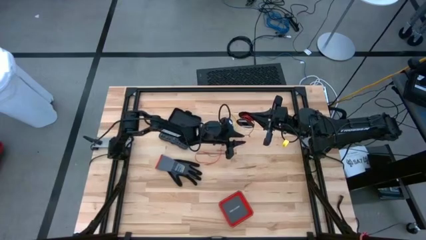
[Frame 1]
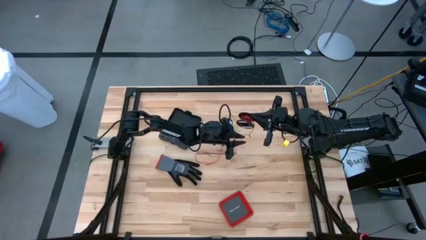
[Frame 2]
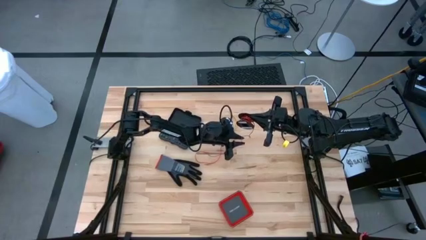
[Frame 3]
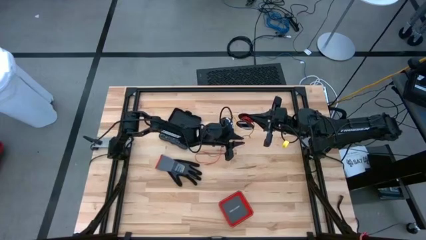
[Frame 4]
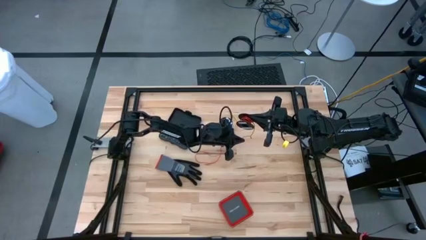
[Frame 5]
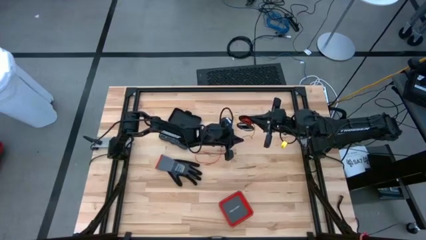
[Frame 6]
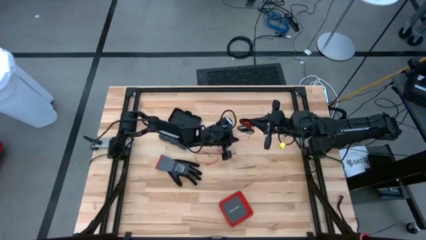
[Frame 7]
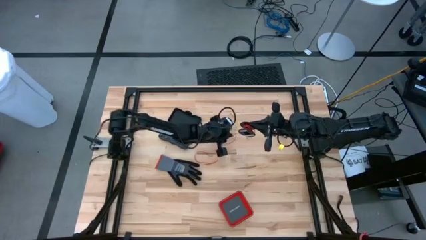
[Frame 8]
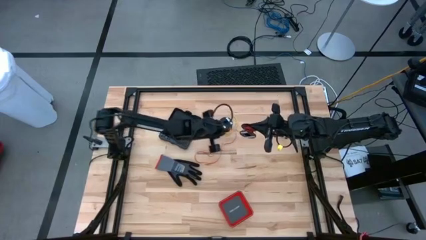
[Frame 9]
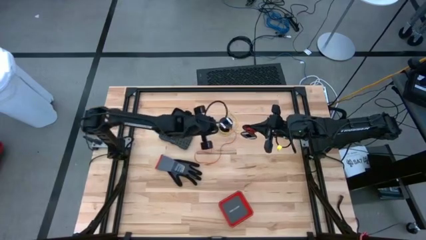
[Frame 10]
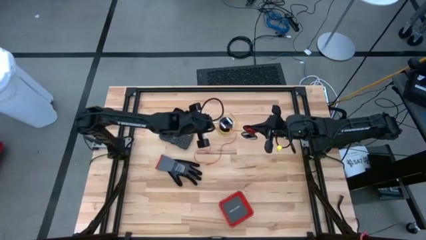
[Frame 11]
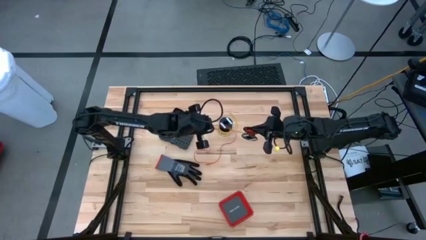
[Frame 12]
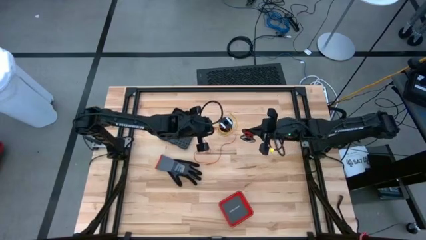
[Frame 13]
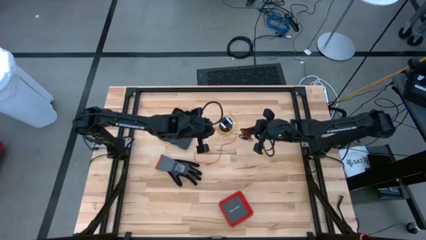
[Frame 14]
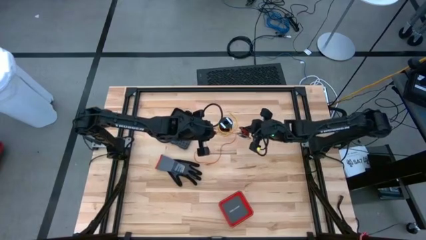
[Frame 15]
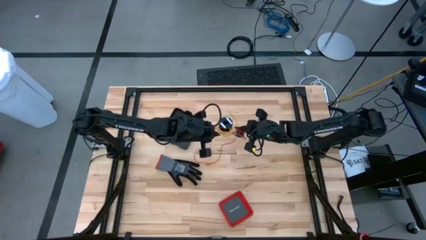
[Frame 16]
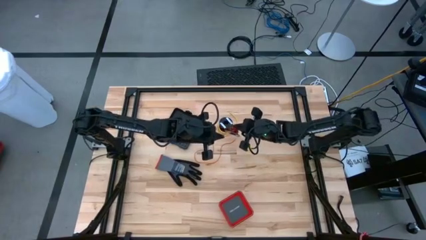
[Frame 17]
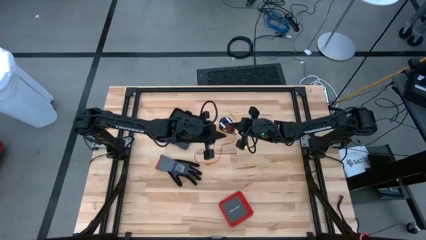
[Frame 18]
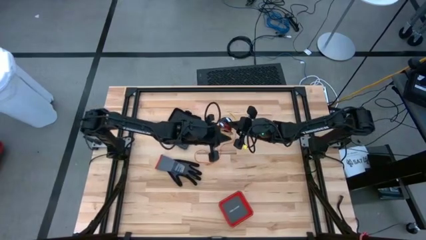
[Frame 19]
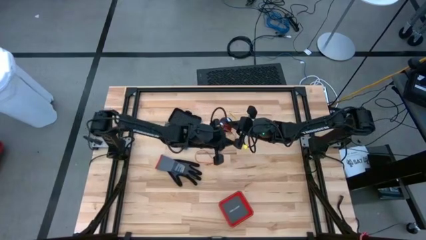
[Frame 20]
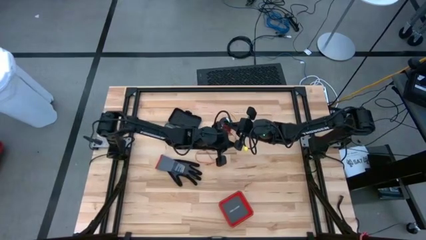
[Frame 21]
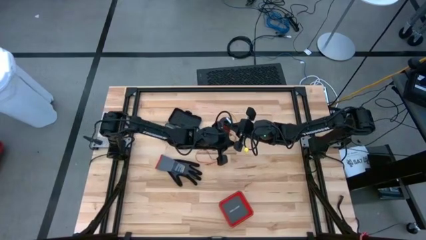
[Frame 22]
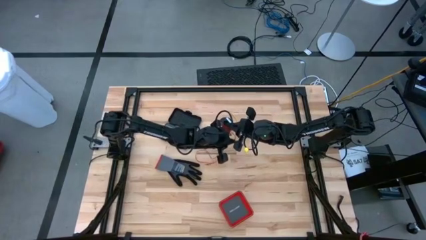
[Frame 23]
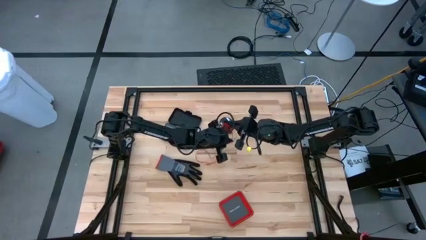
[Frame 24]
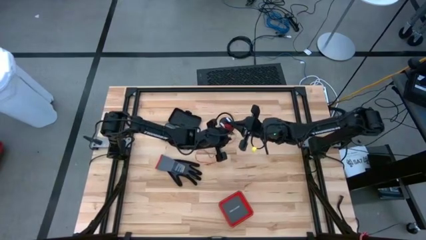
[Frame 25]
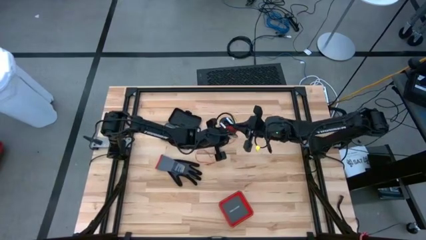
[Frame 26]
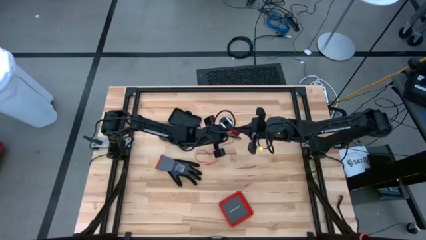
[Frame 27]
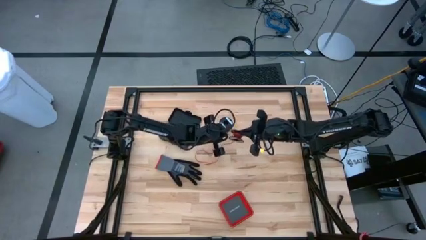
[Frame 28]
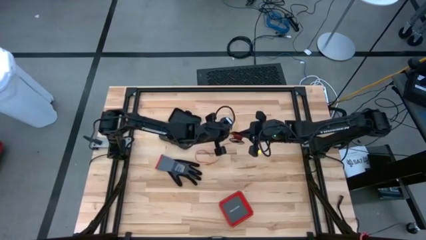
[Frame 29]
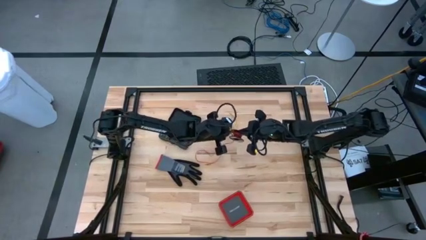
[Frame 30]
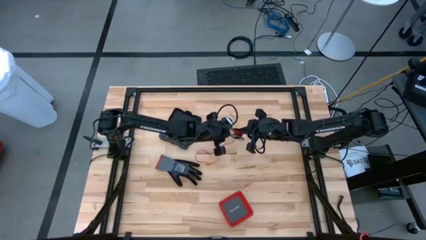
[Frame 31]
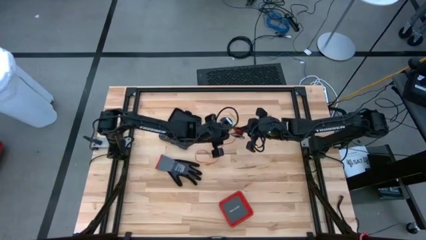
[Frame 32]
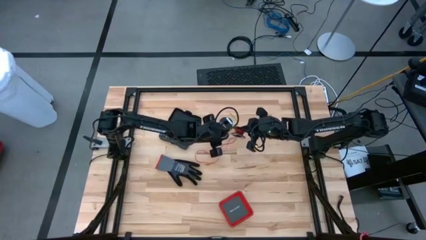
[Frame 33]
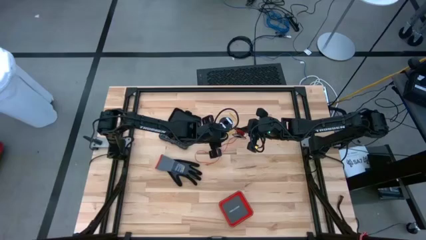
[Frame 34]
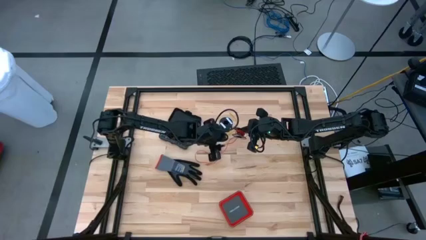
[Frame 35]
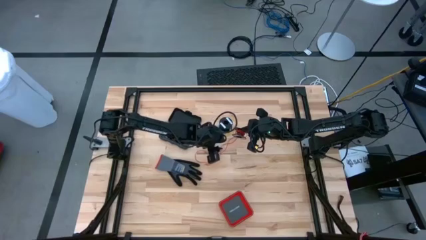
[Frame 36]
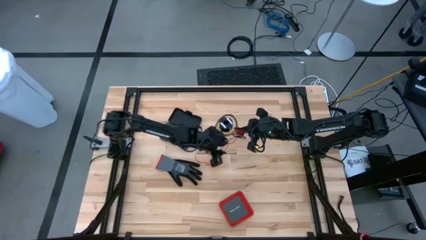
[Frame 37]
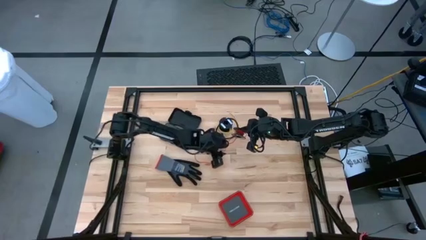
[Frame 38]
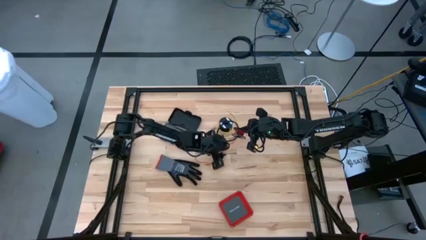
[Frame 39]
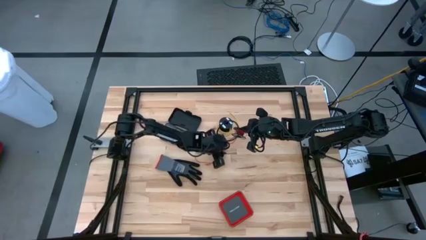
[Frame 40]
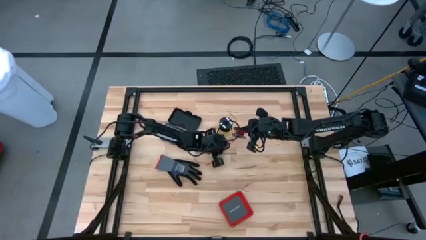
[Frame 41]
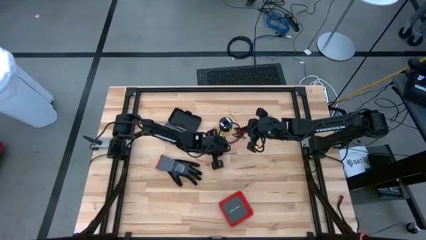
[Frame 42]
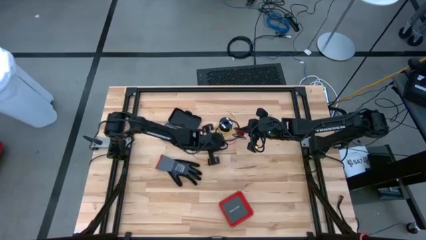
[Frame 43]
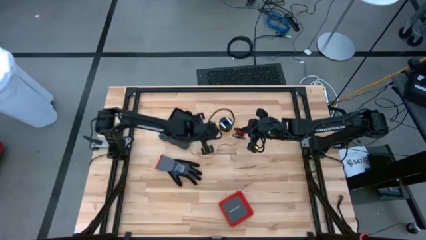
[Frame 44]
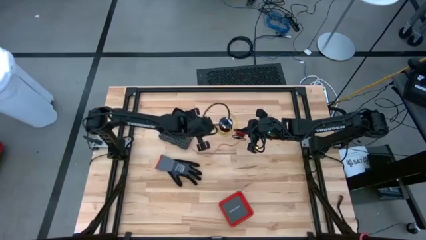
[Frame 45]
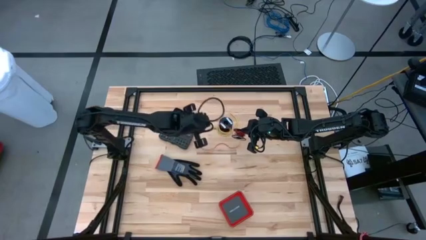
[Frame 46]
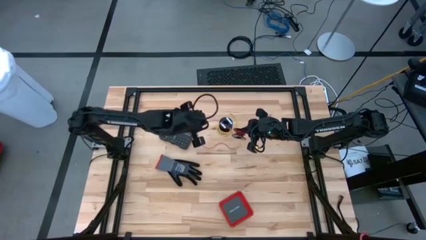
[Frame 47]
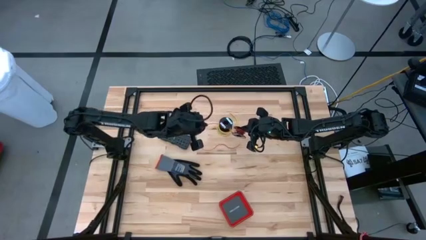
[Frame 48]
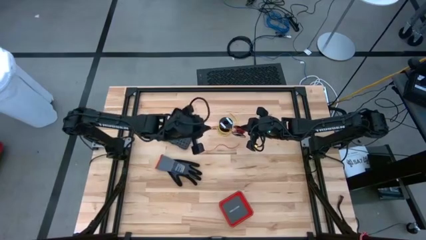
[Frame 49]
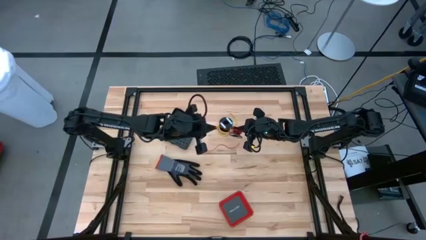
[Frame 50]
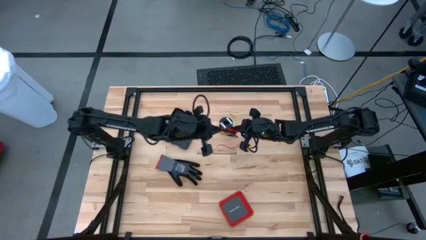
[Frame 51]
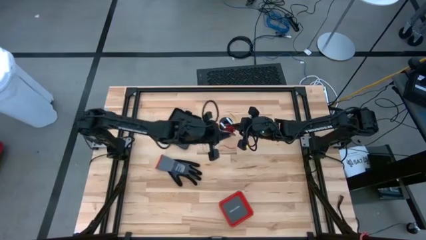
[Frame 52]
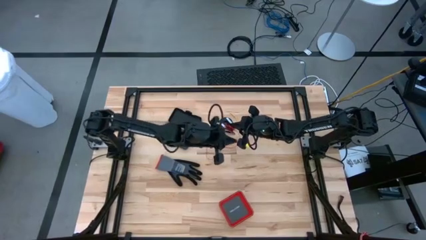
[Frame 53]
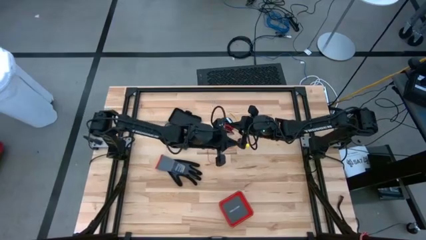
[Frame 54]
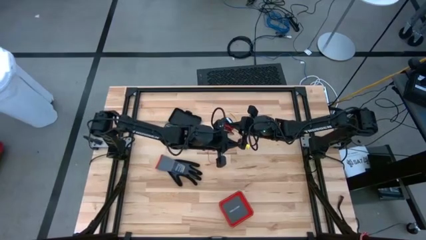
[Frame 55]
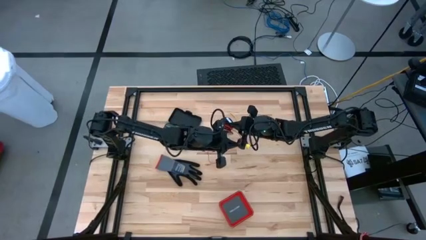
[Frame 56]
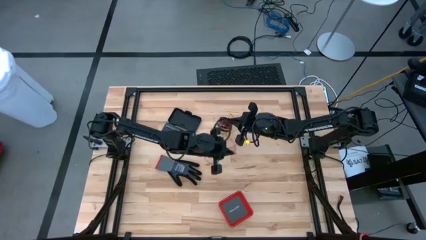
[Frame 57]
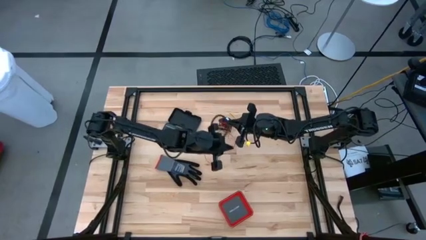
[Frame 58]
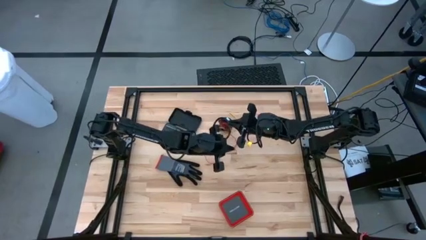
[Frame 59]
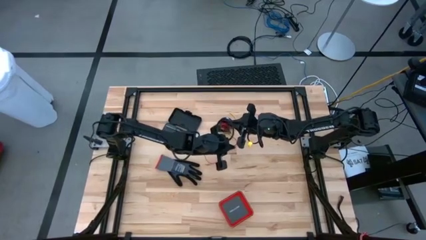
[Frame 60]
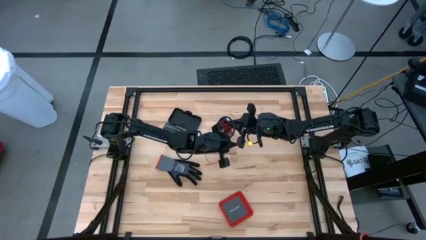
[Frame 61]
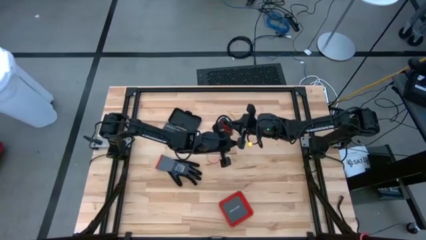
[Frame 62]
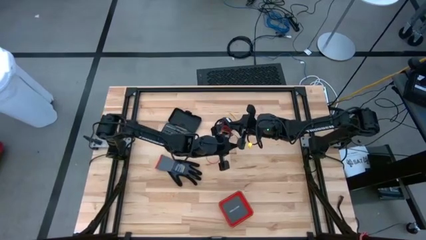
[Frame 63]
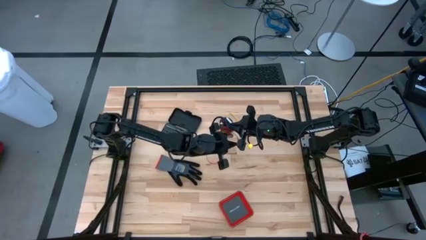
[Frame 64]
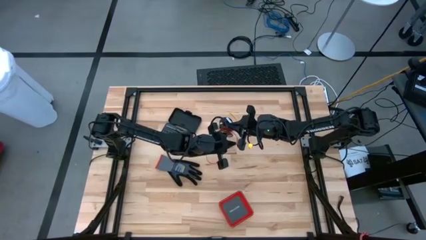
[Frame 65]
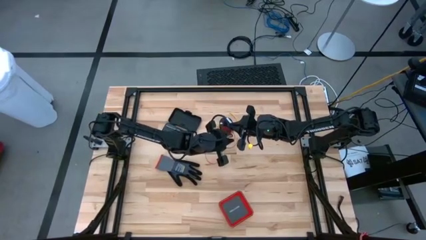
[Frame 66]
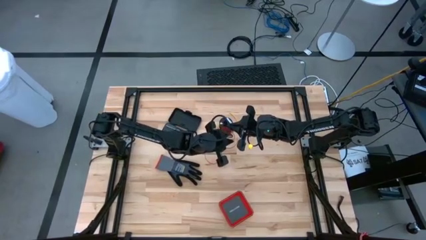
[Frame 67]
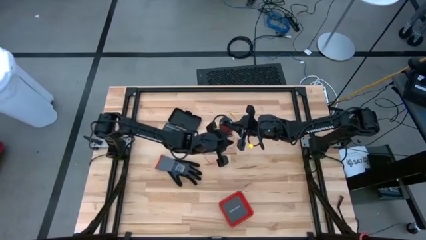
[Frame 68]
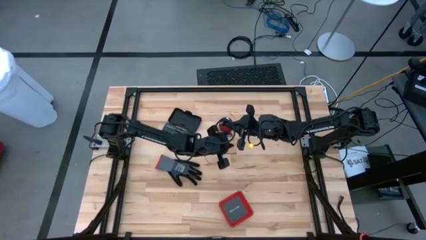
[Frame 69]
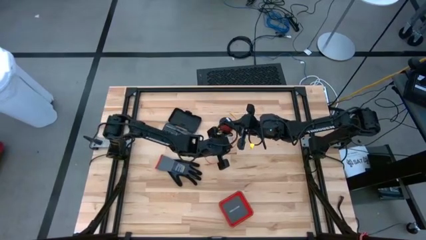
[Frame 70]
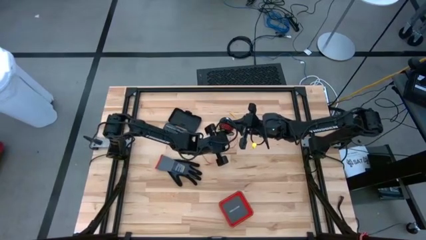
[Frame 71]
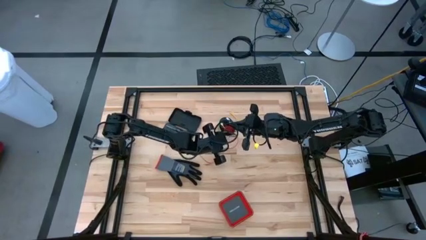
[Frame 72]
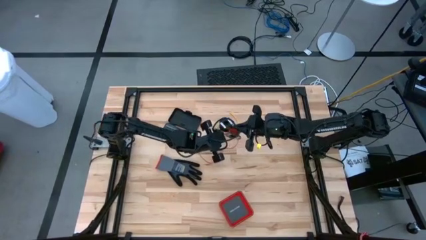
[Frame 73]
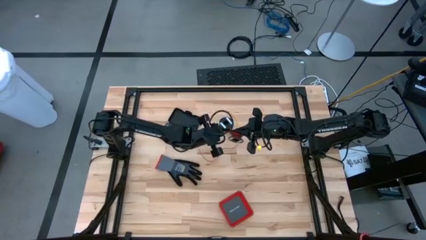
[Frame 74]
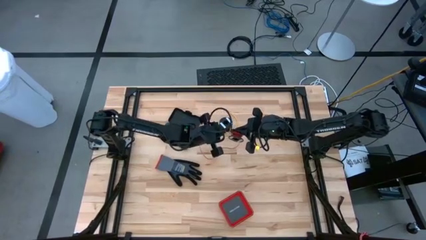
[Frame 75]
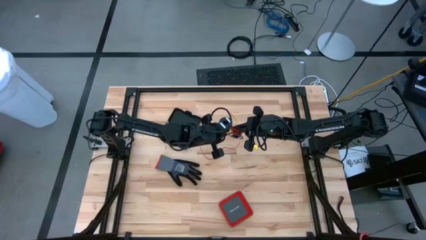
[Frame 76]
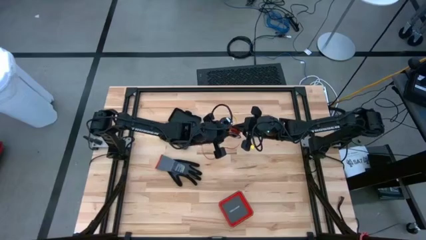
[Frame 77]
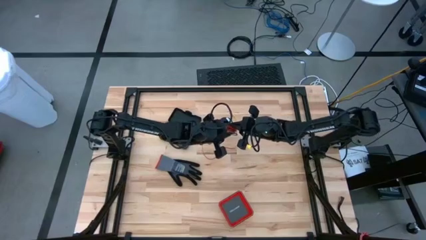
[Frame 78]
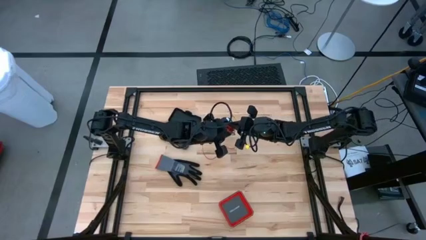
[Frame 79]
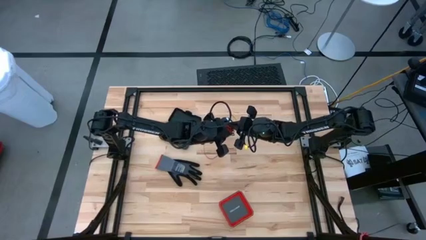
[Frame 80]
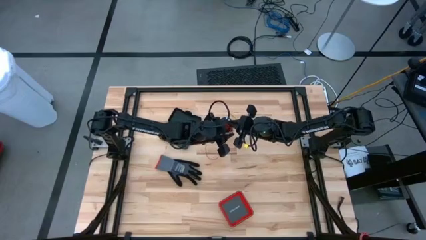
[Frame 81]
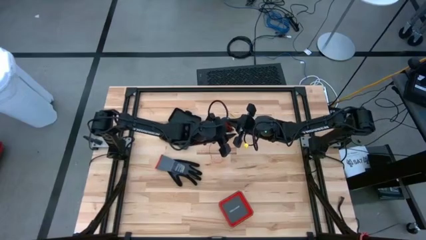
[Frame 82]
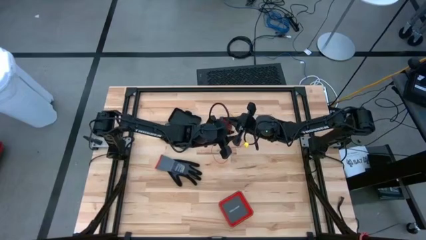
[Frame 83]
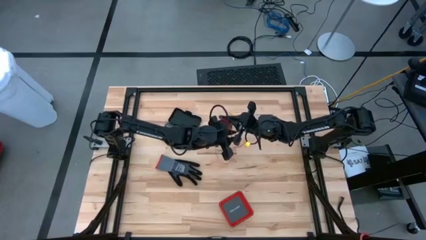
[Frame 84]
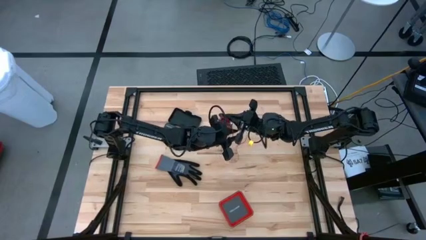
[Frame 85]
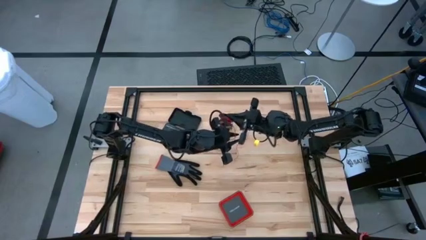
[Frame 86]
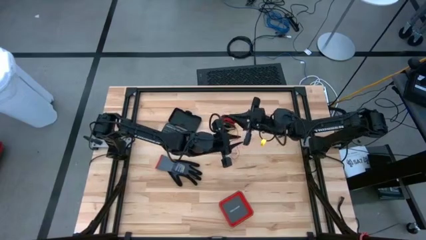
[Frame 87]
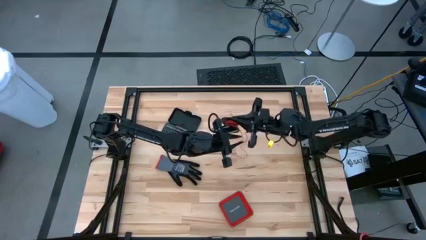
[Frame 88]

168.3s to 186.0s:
Task: Coil cords
Coil the red wire onto the spool
